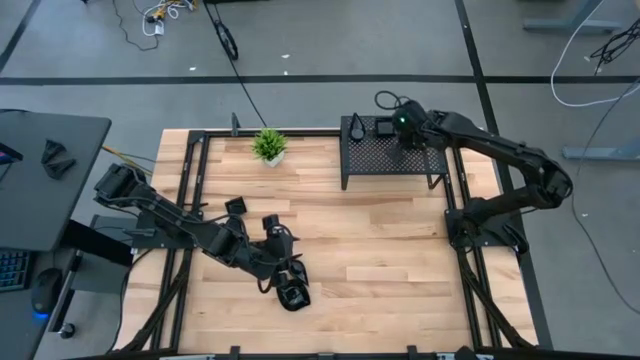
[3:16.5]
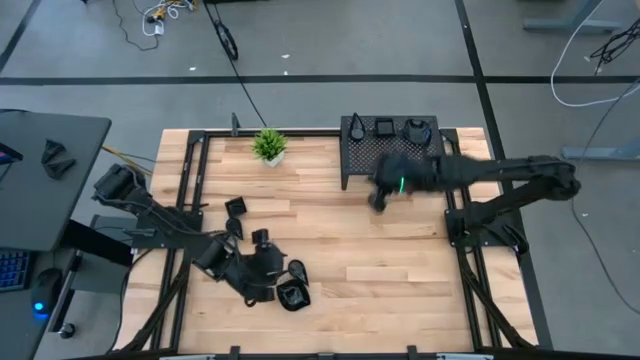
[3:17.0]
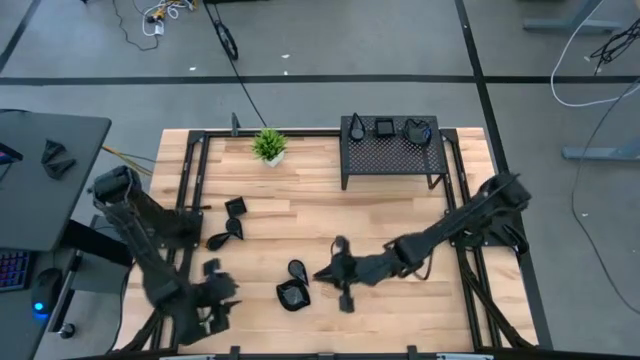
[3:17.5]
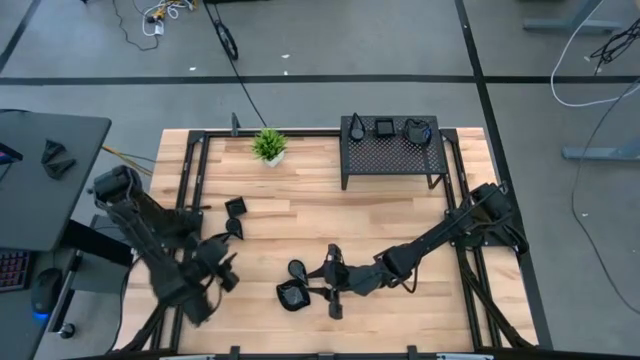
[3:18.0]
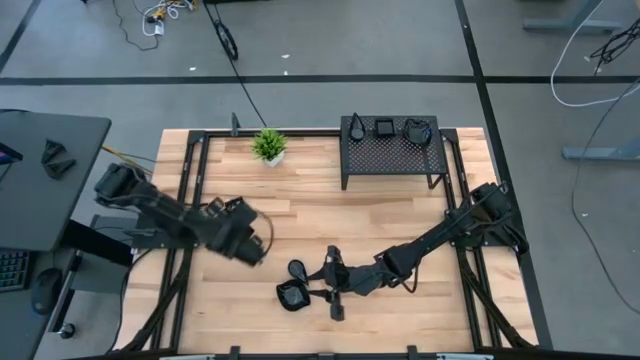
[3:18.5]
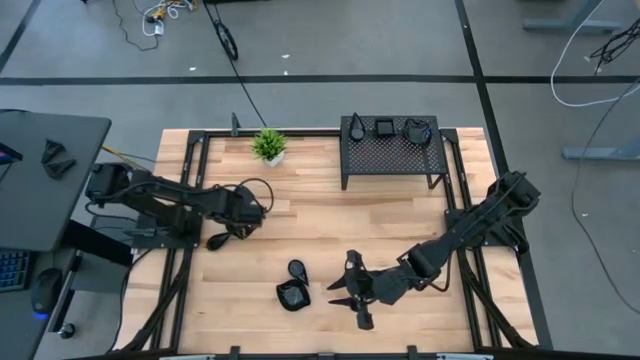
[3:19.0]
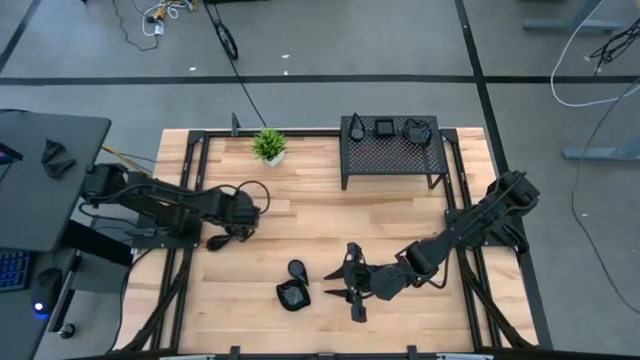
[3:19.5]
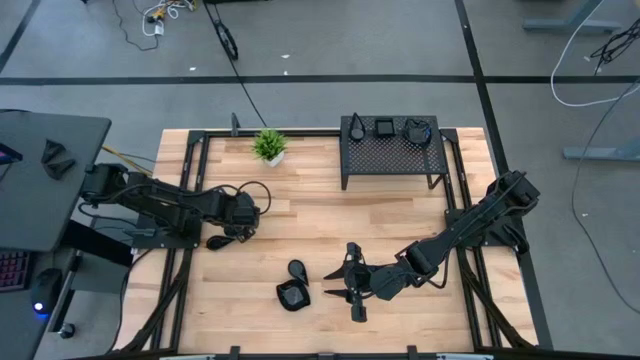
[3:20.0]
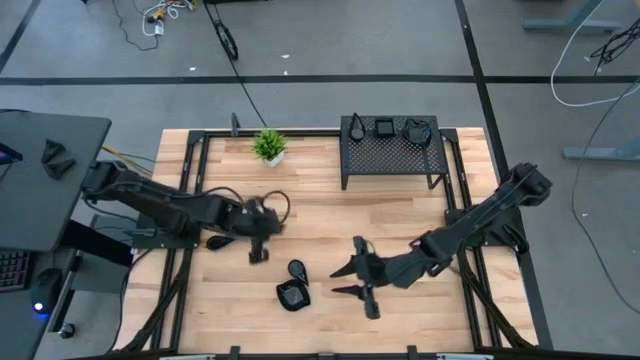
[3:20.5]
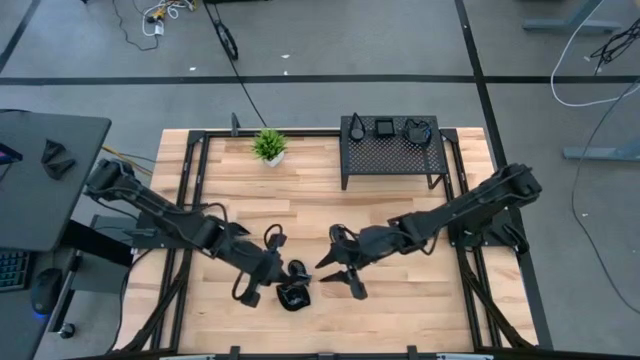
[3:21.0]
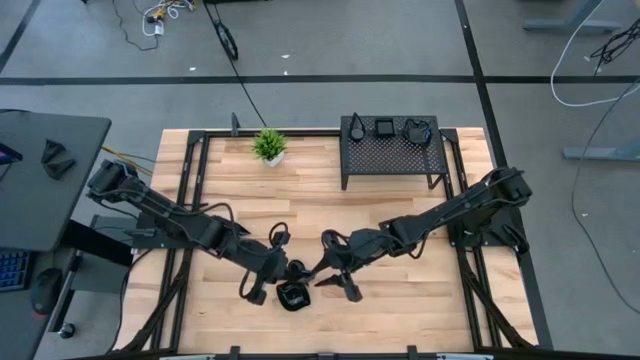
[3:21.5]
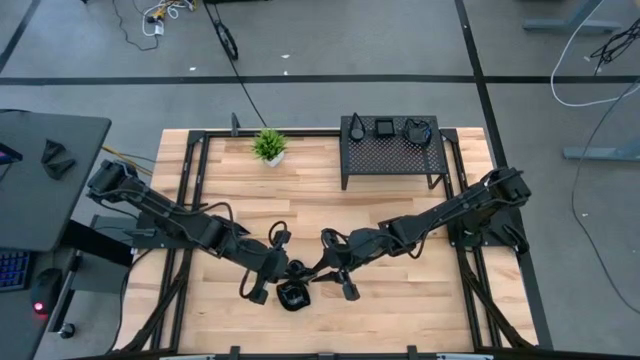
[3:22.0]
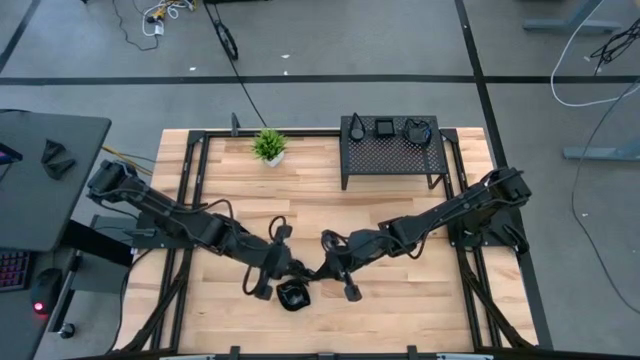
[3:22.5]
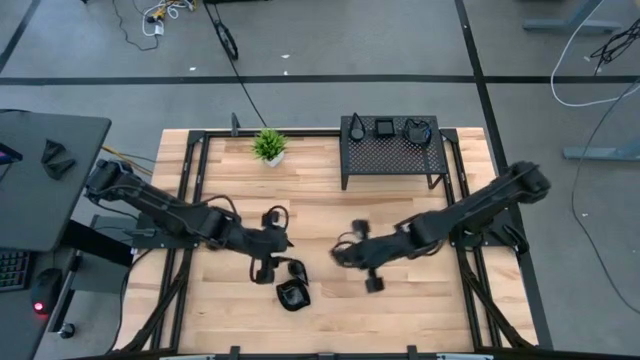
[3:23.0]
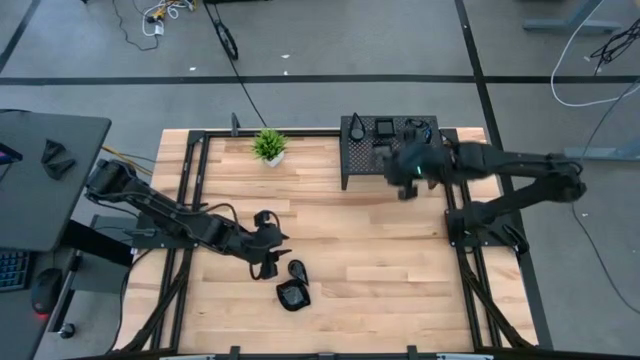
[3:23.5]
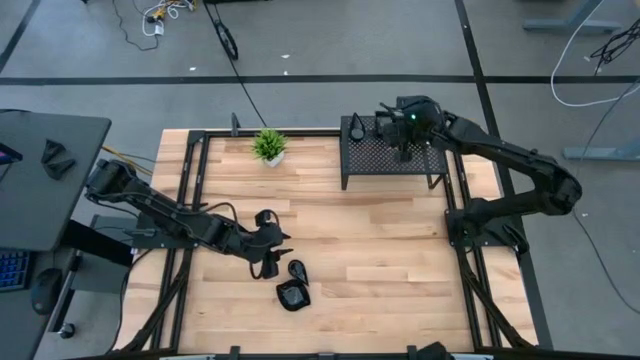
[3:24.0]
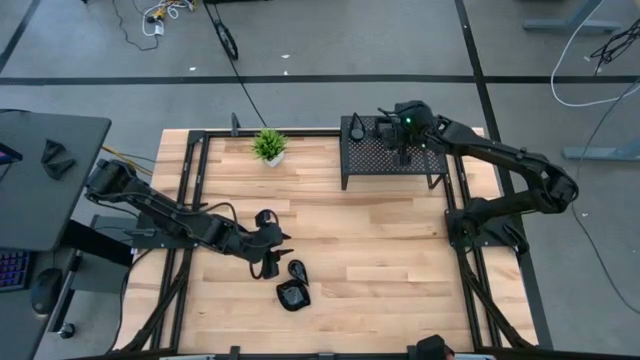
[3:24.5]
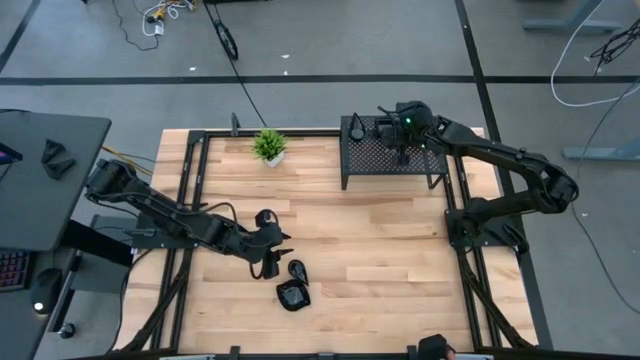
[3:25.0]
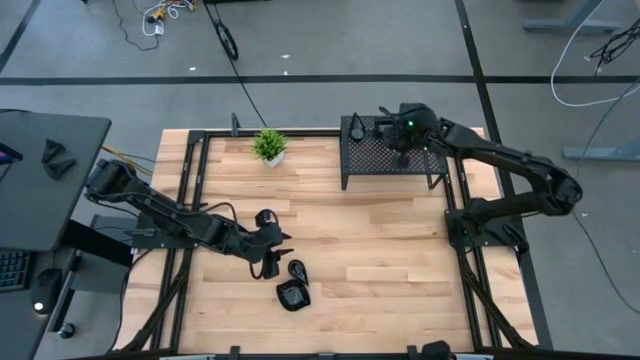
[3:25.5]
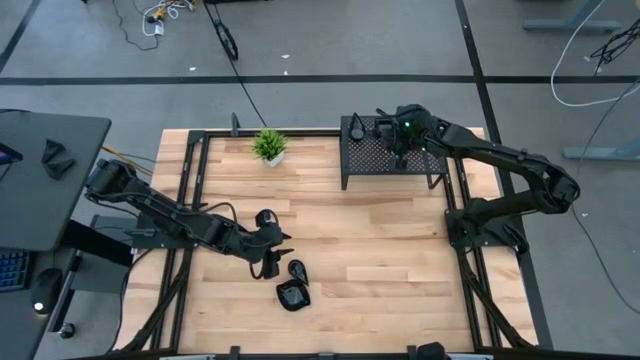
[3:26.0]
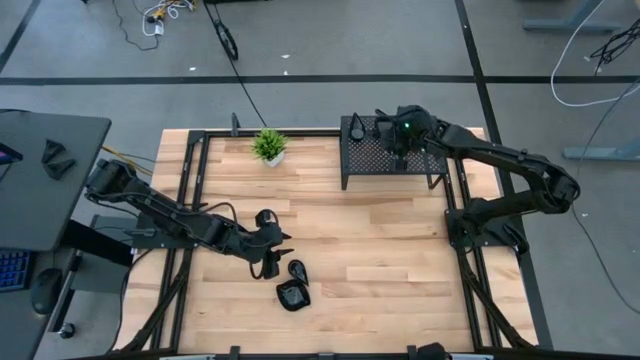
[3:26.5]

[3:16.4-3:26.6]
Task: Pick & Place Mini shaped plates
Stack the black square plate on top of the black square plate on the shelf

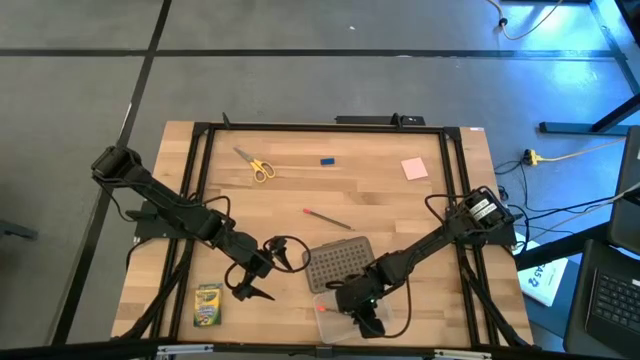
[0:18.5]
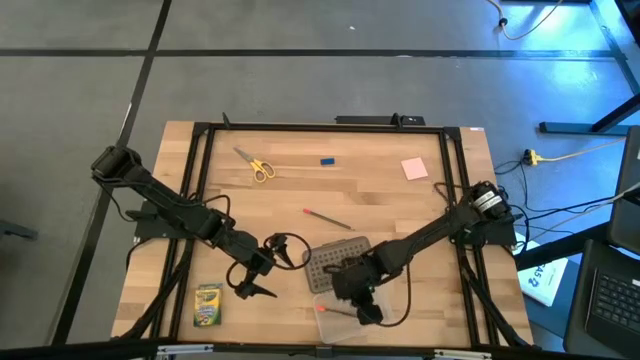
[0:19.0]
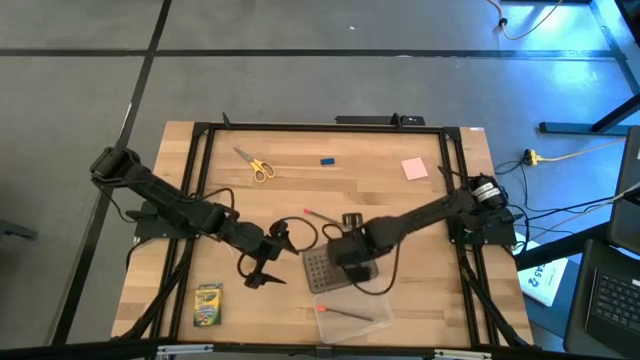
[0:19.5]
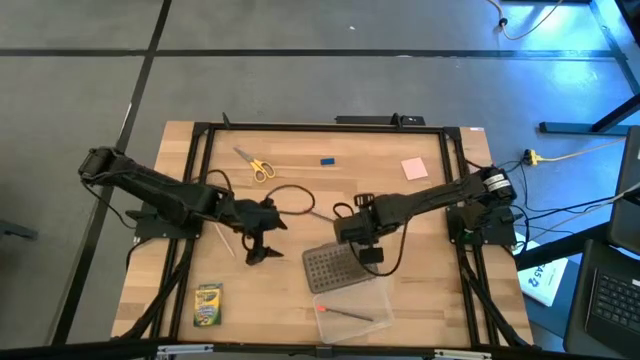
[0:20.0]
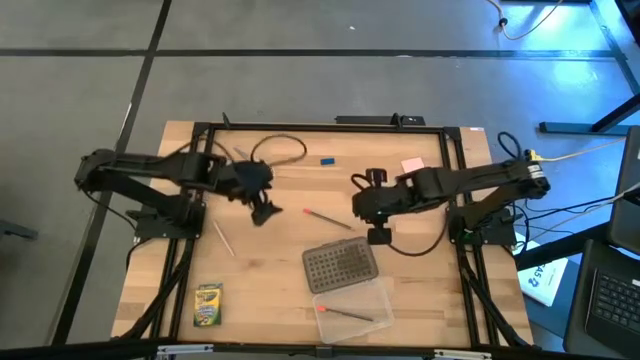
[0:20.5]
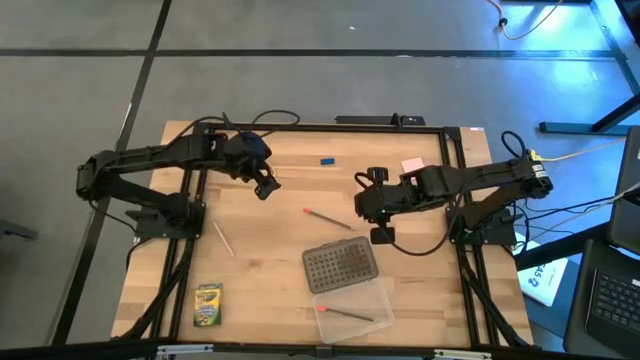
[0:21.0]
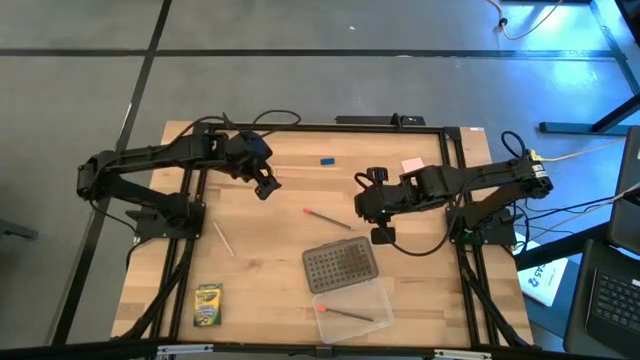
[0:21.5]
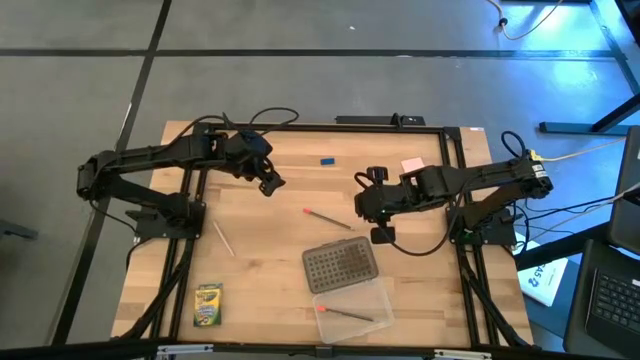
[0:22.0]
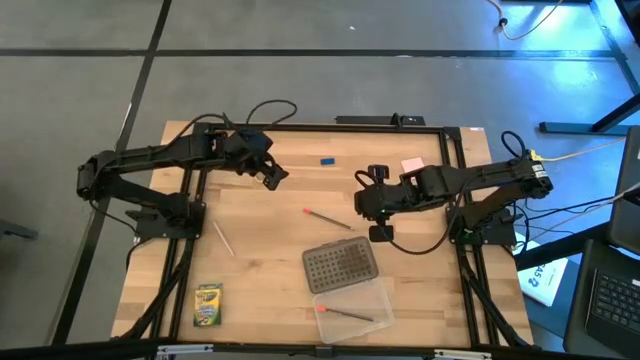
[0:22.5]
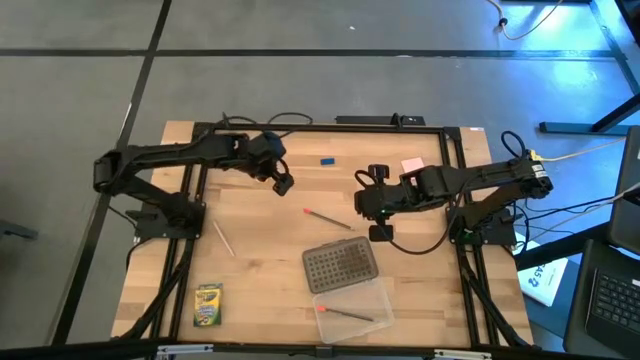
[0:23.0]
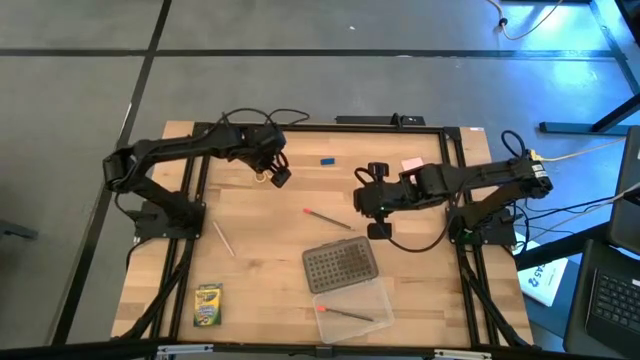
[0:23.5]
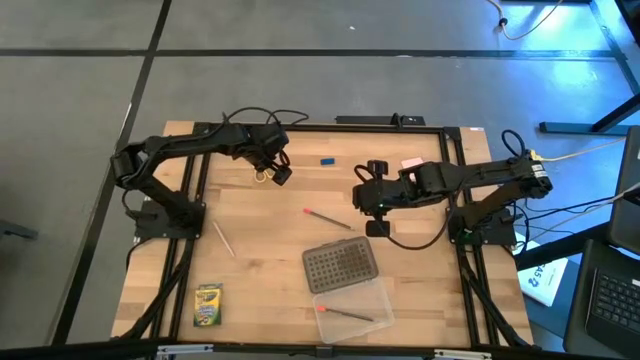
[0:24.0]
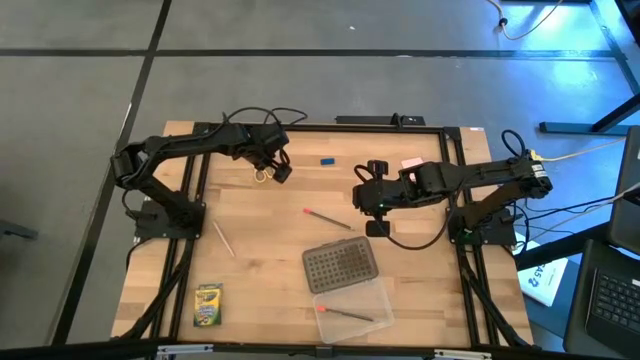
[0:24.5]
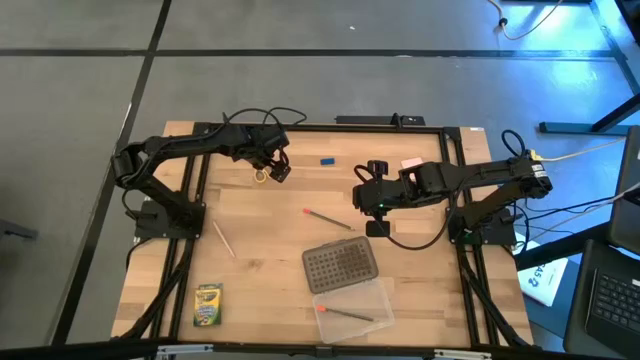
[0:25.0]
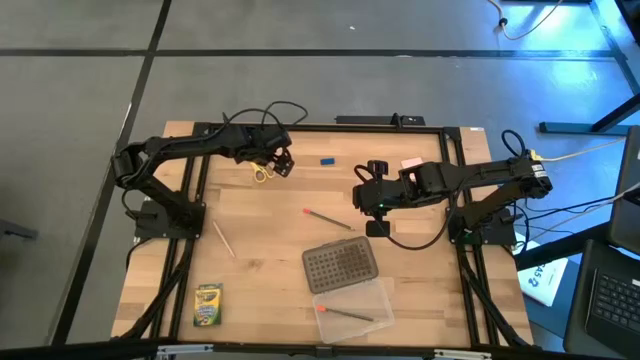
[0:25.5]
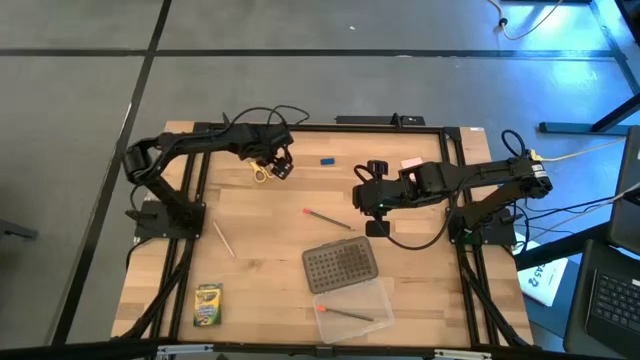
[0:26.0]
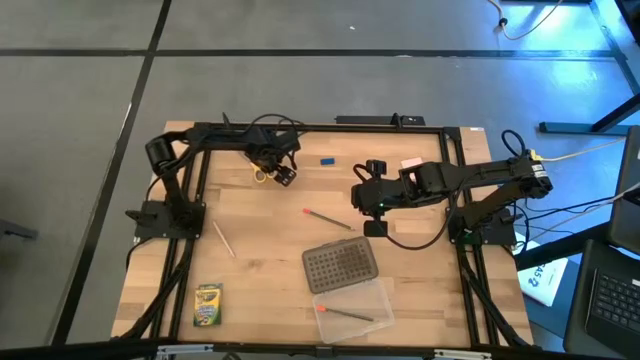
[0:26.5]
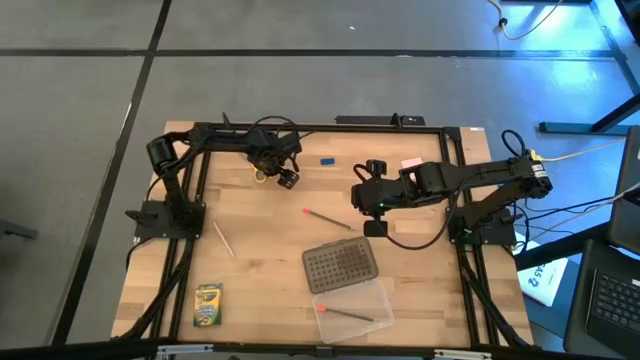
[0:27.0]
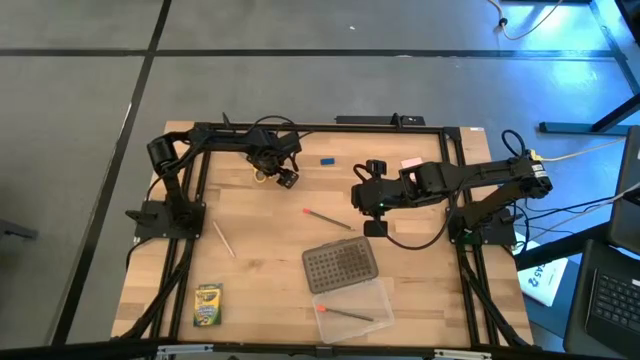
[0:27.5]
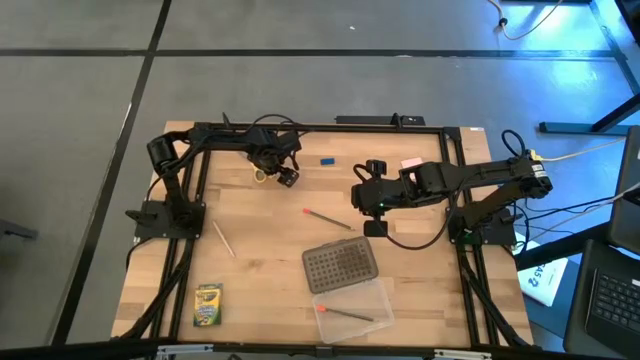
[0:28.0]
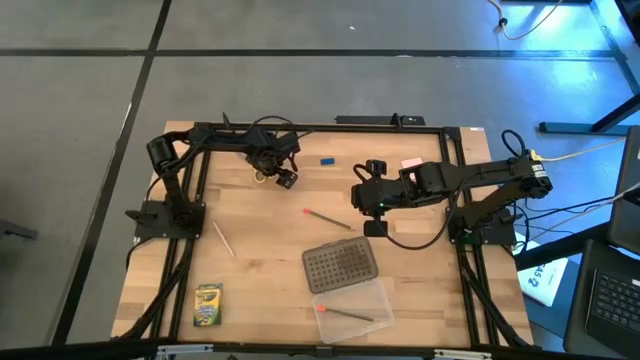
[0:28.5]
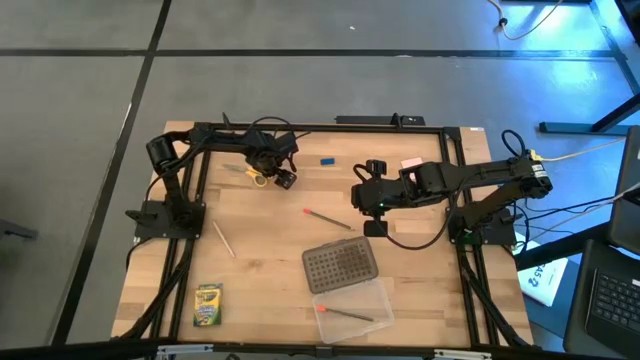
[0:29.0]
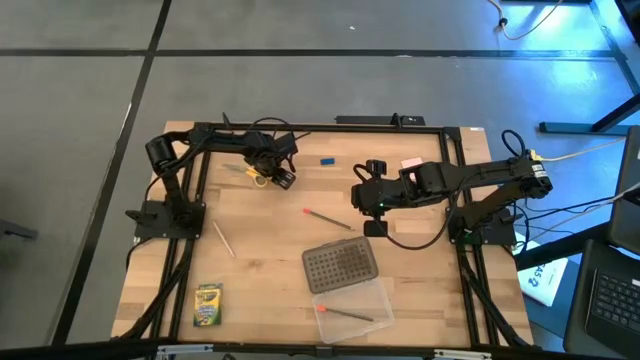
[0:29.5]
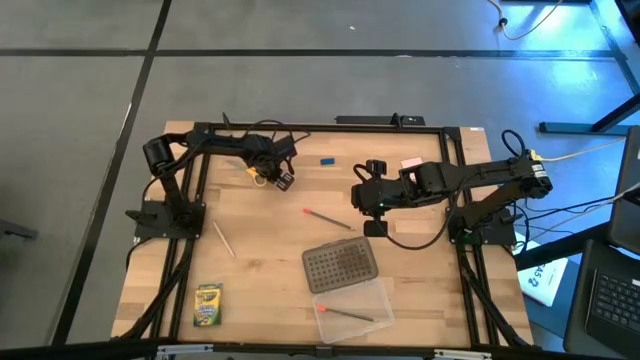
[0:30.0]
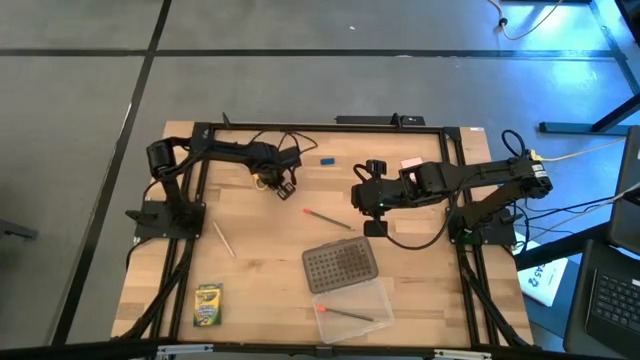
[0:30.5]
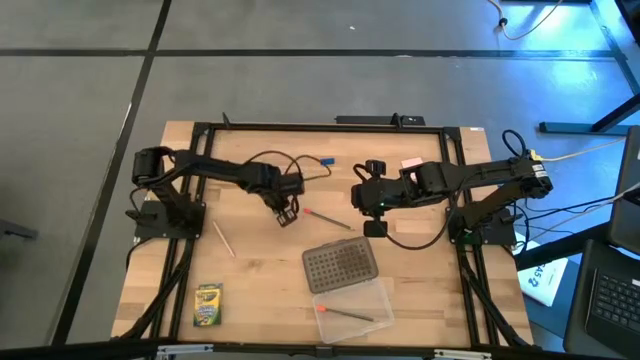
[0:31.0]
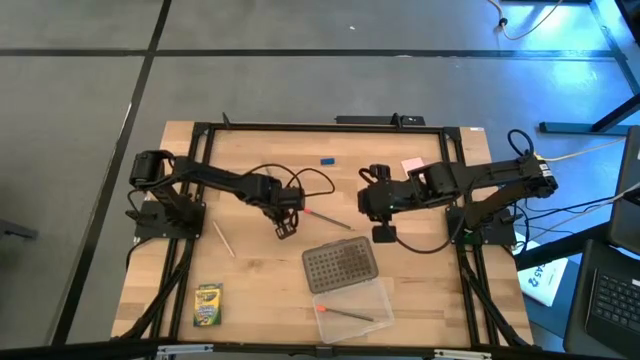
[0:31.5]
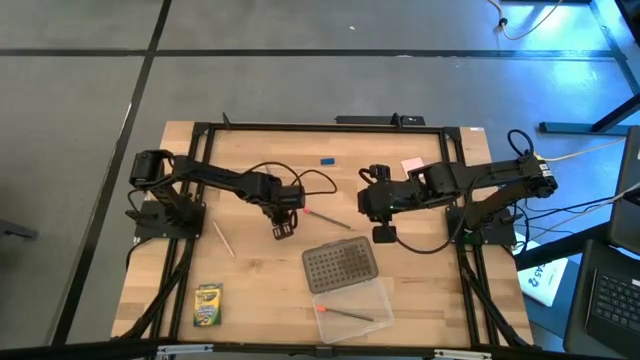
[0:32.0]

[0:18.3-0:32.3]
Task: Pack school essentials
Put the yellow scissors into the supply box
